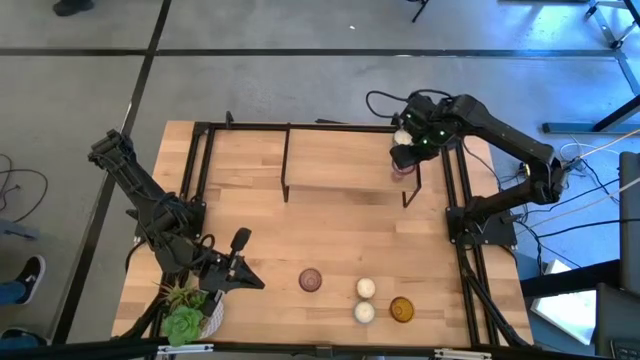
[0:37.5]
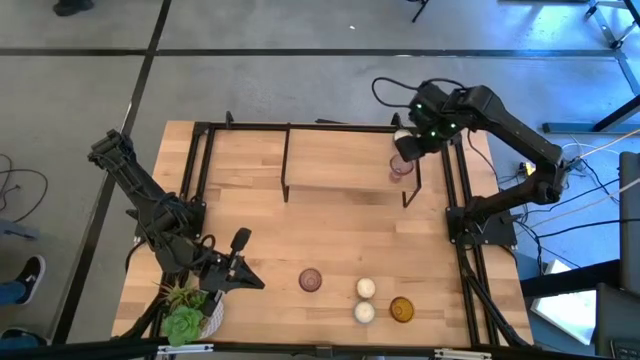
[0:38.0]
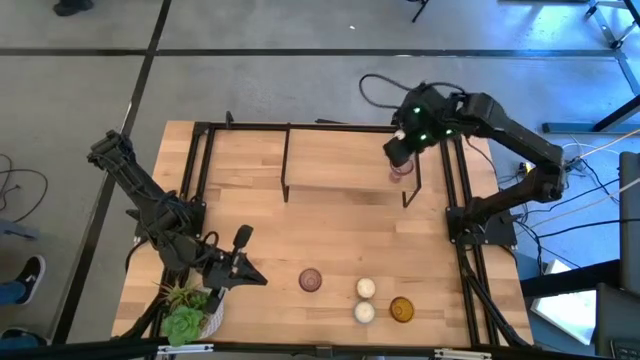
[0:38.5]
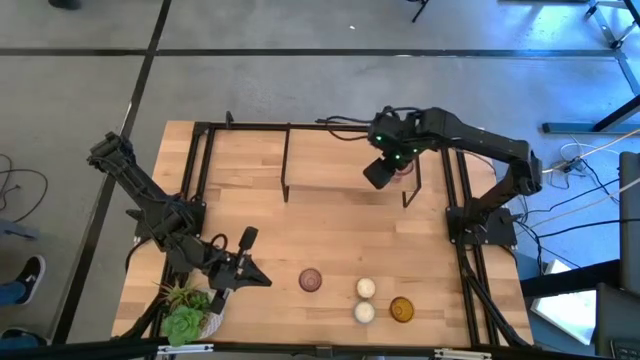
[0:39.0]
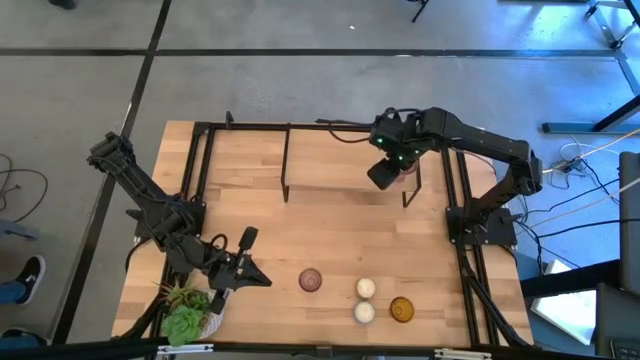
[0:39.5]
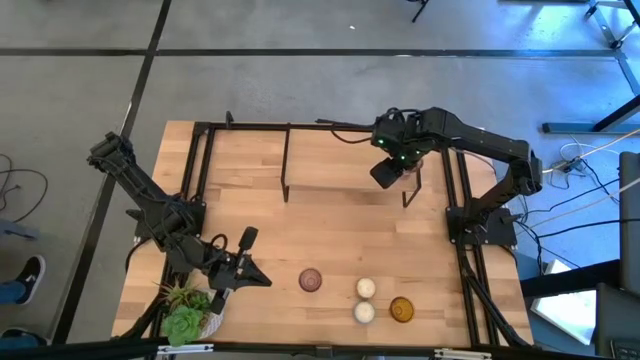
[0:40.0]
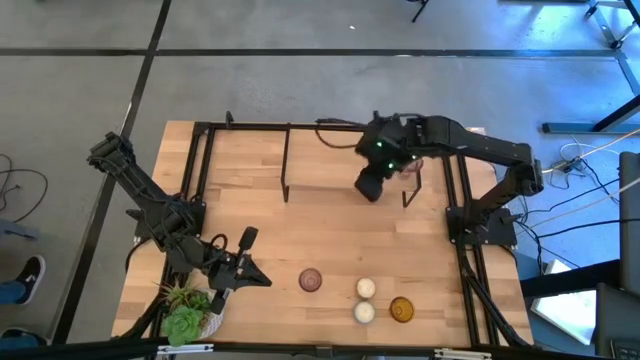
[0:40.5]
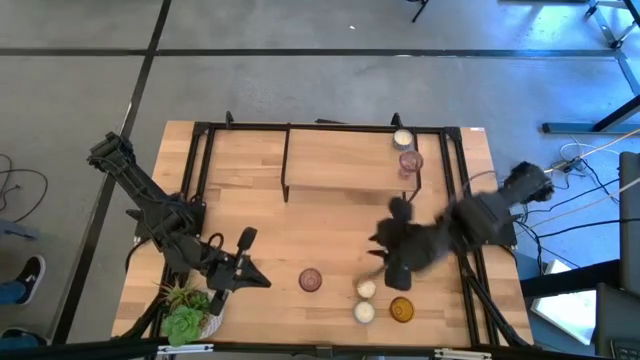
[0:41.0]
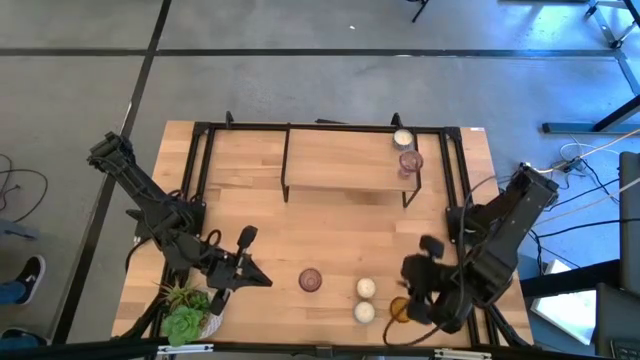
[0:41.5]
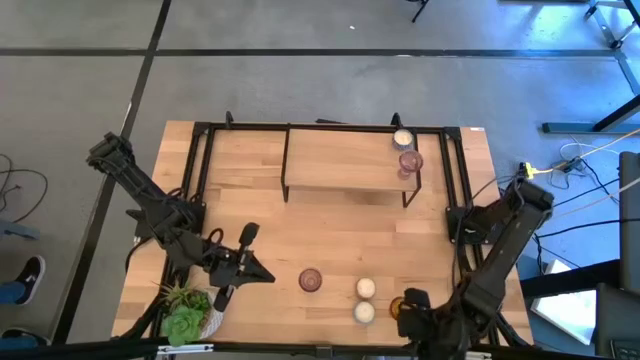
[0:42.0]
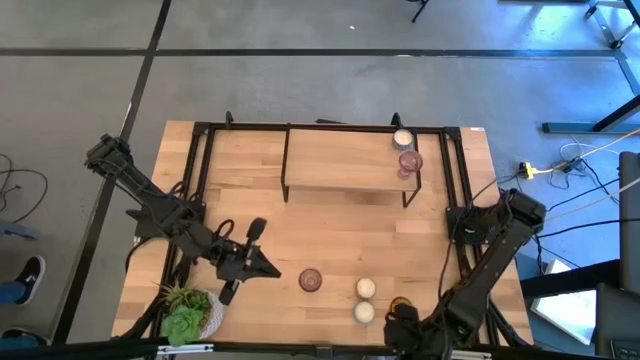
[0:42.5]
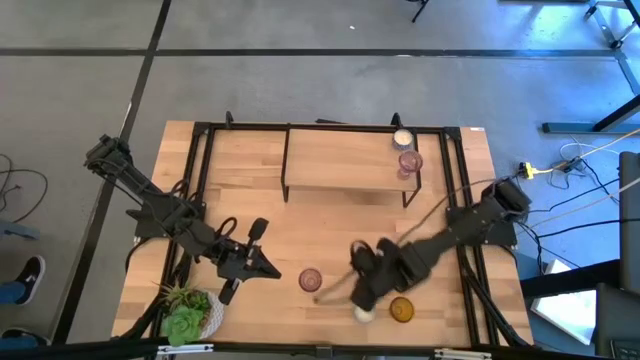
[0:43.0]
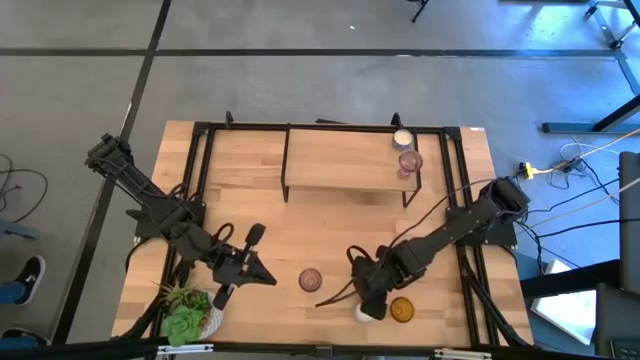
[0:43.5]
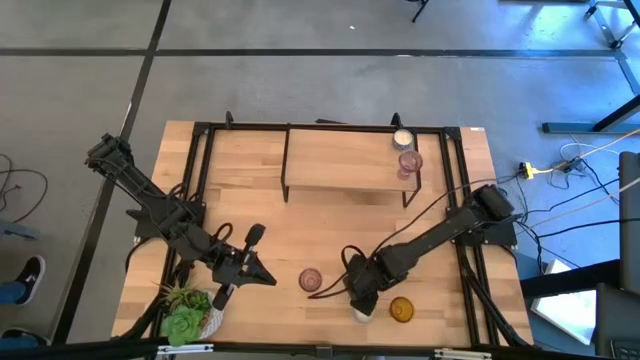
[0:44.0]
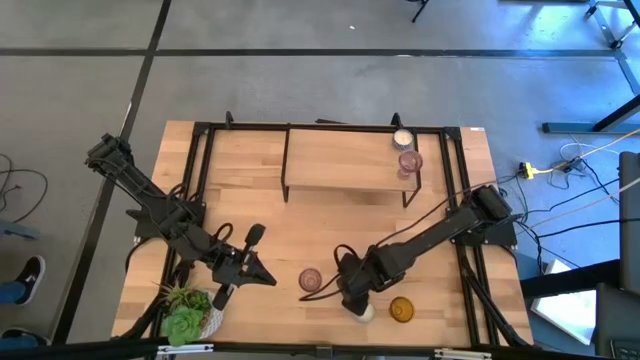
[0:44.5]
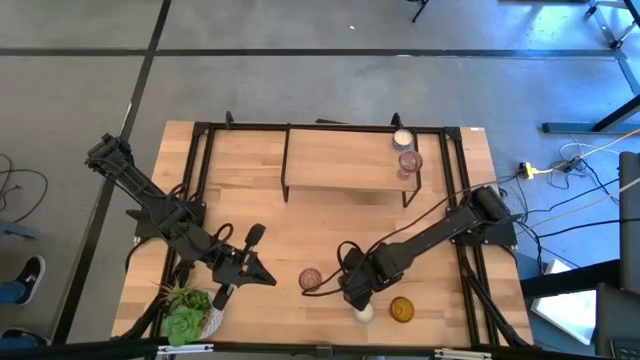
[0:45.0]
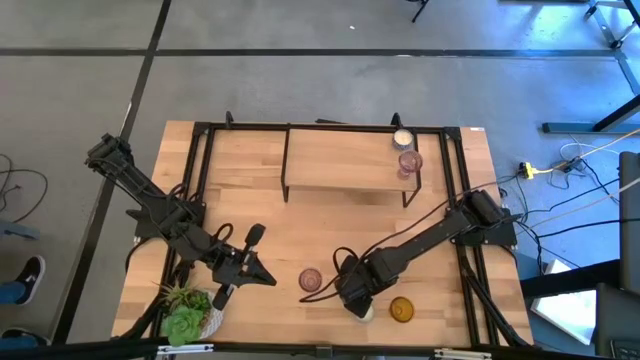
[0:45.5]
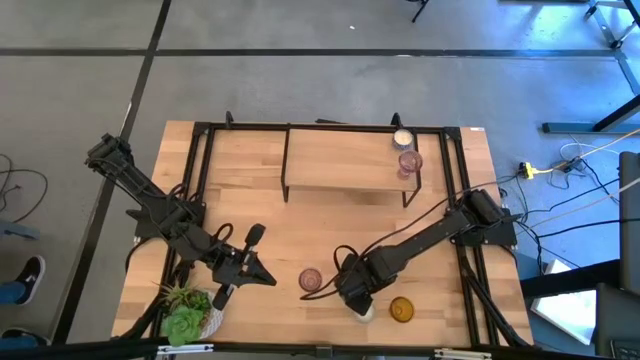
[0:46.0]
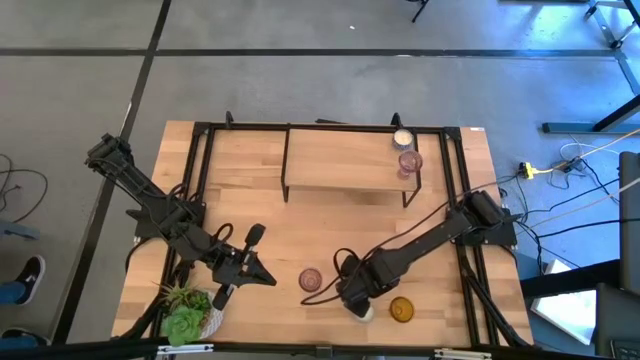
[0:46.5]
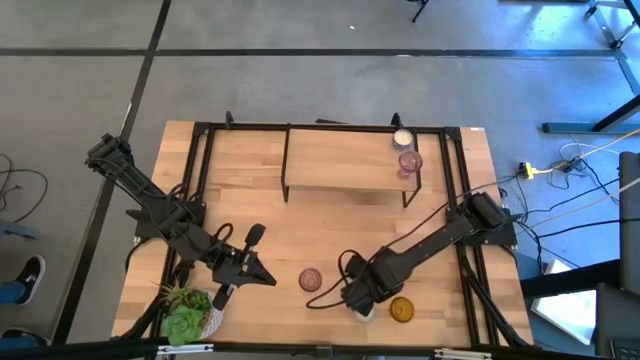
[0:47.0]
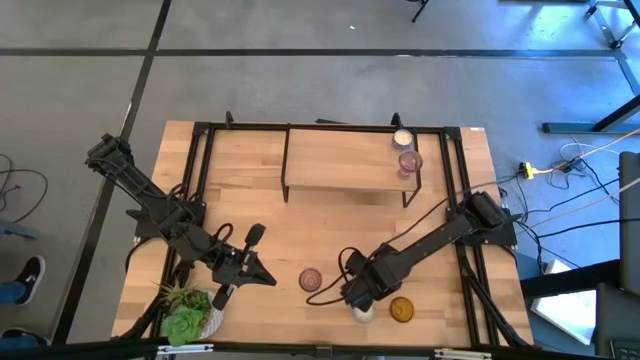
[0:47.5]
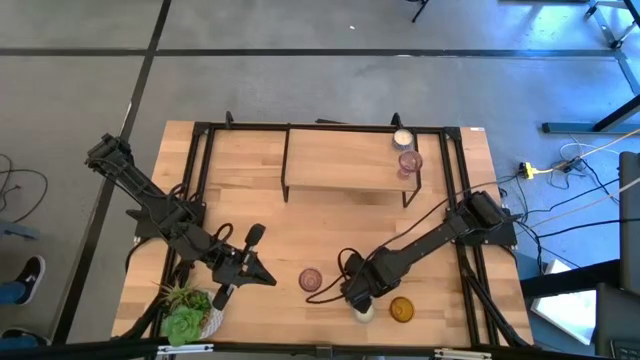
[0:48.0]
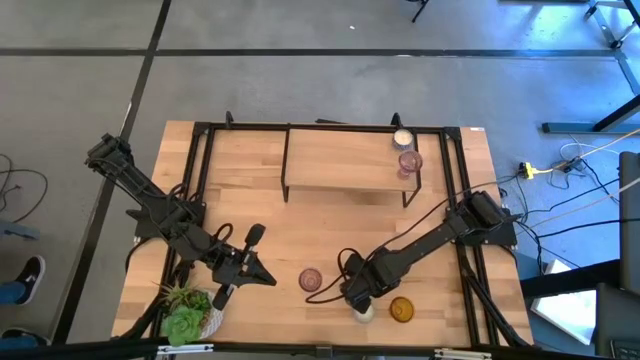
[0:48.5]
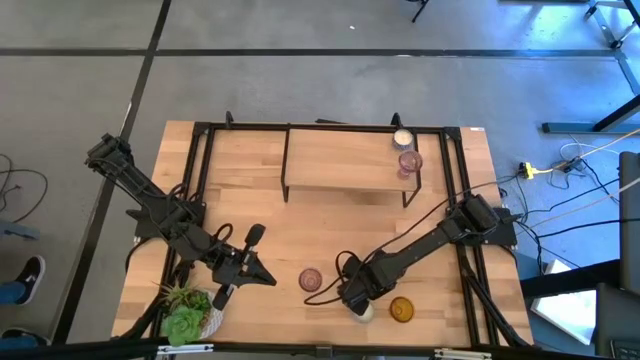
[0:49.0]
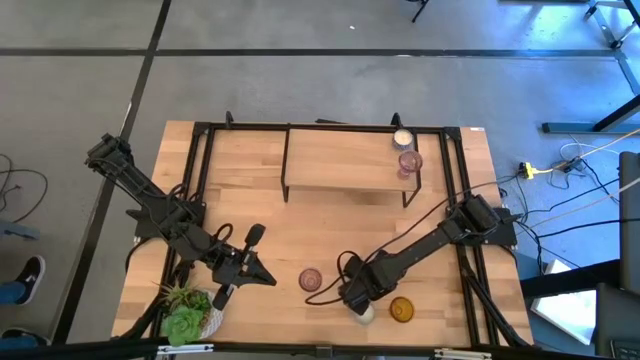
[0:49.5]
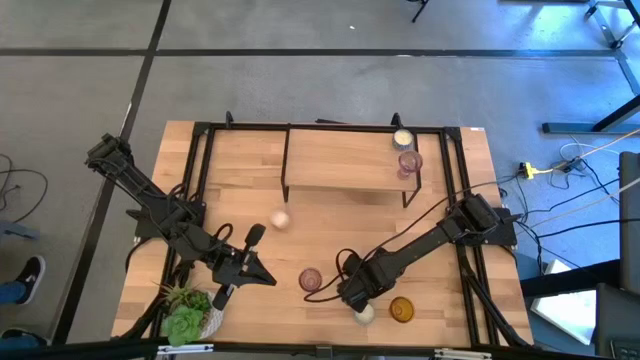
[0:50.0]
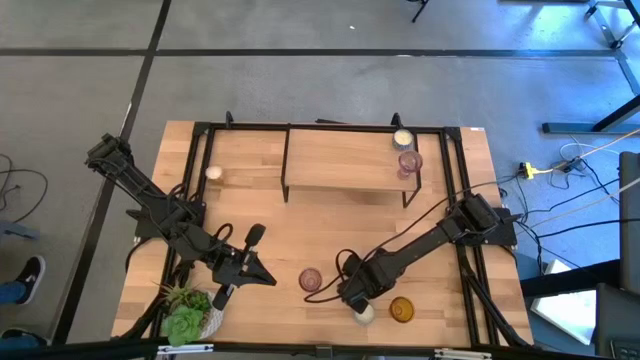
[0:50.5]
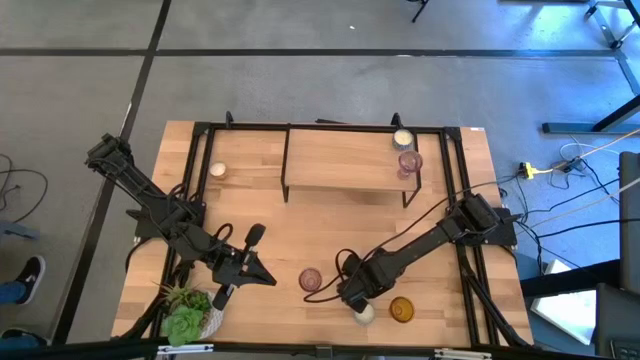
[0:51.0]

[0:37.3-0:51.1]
Task: Pick & Place candle stick holders
Put the yellow candle on the shelf
